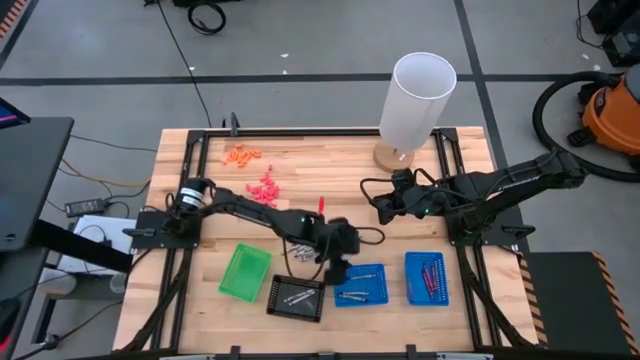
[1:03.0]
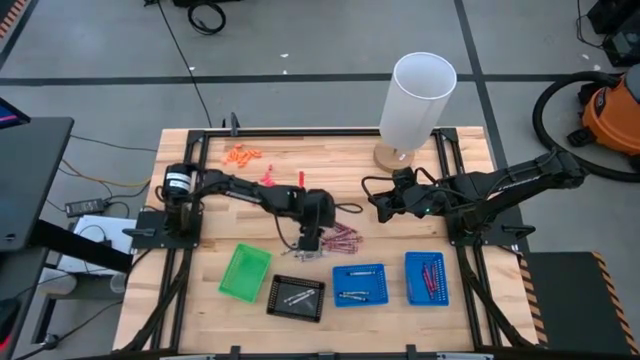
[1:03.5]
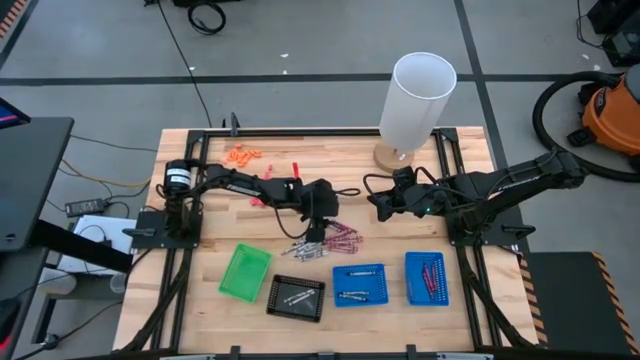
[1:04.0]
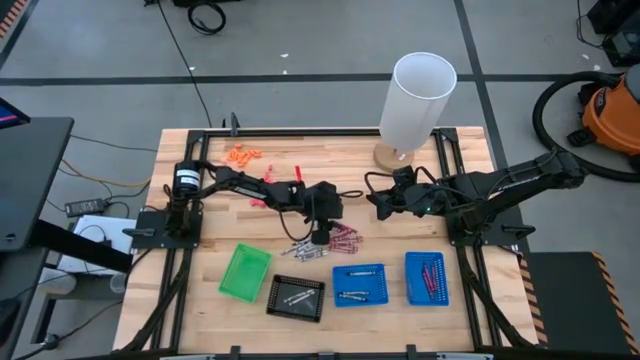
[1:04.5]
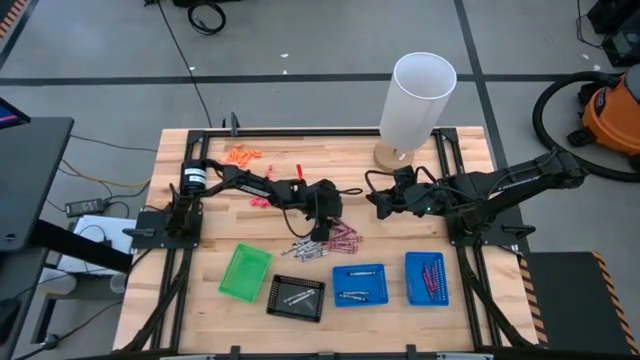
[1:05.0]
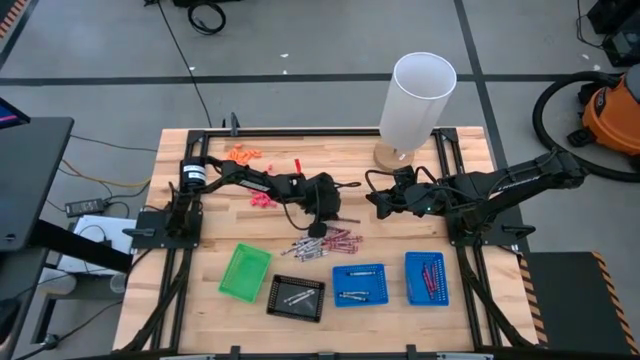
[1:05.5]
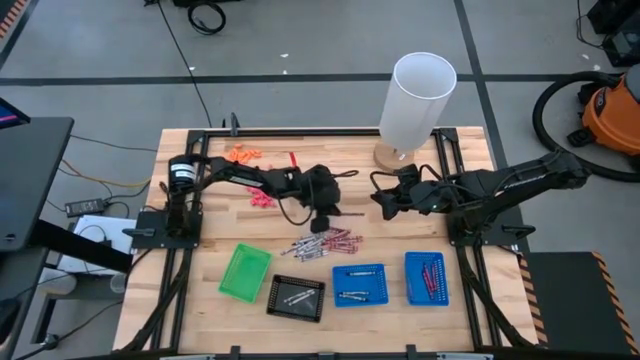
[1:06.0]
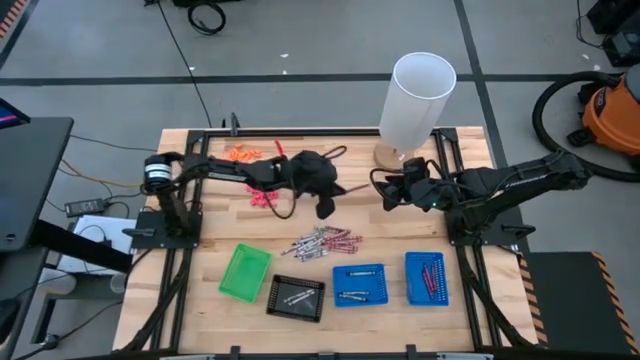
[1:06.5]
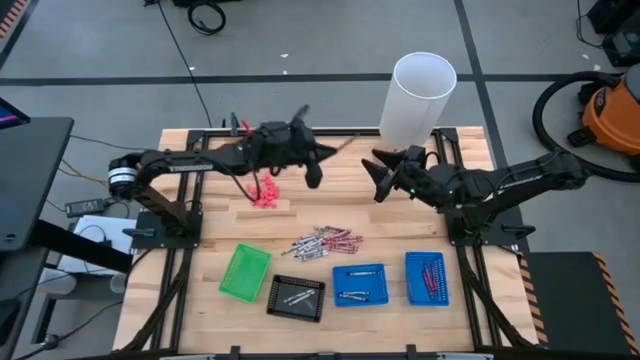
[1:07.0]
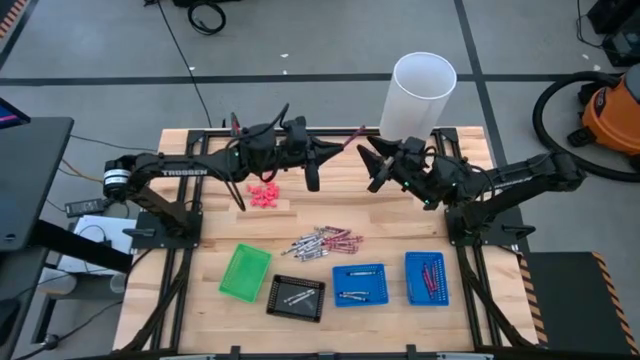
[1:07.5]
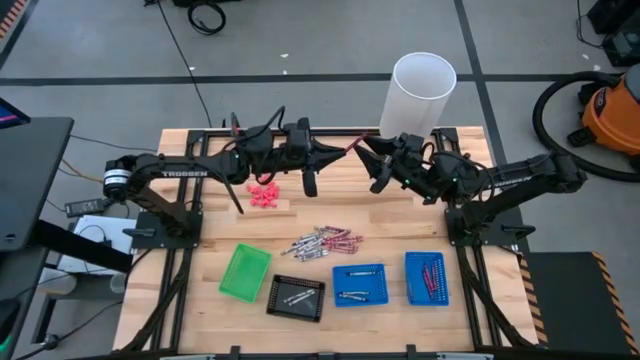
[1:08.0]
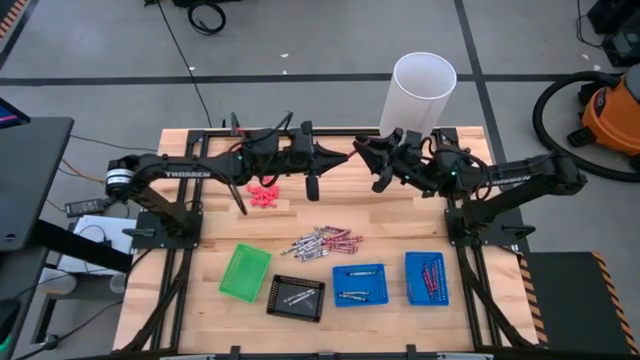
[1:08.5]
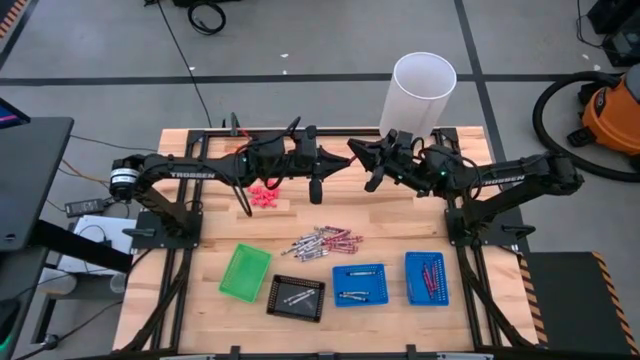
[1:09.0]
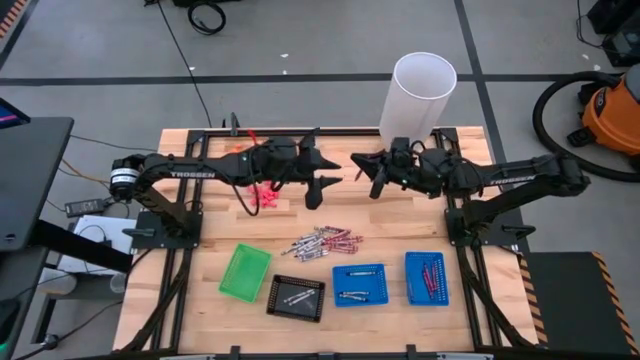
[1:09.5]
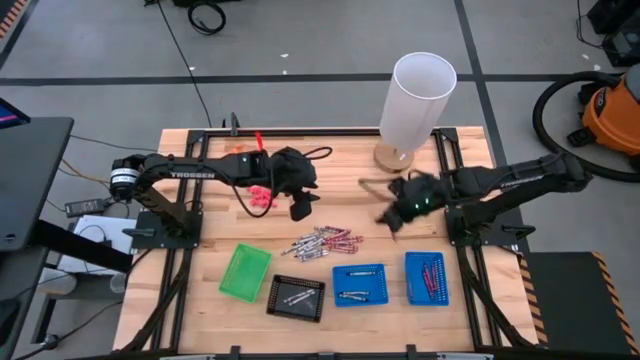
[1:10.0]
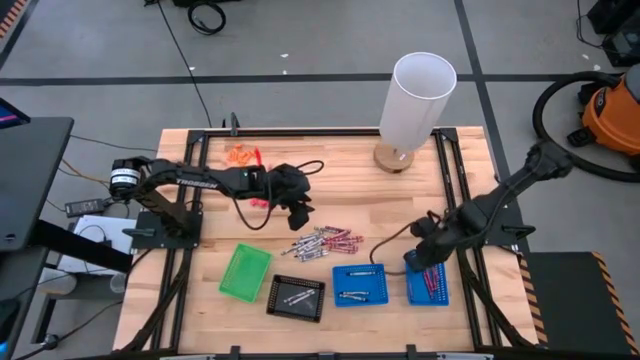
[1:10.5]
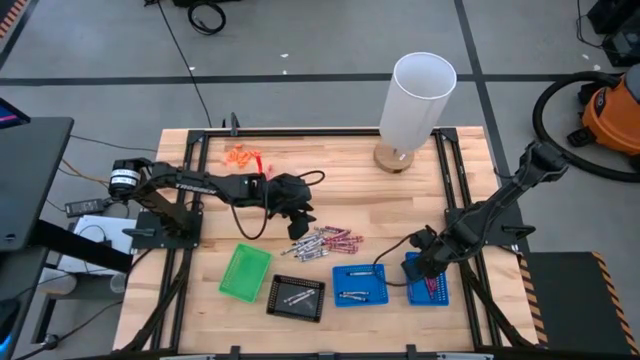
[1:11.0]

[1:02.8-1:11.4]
Task: Sort crayons
Put the red crayon into the right blue basket

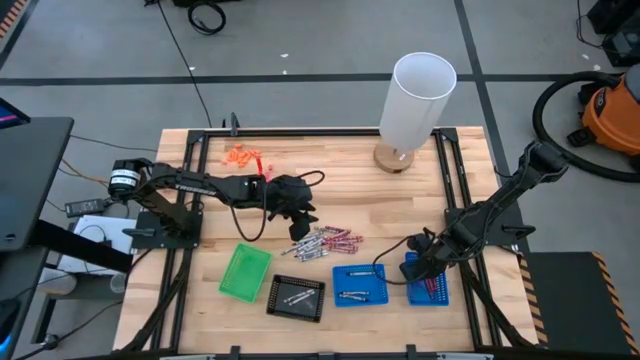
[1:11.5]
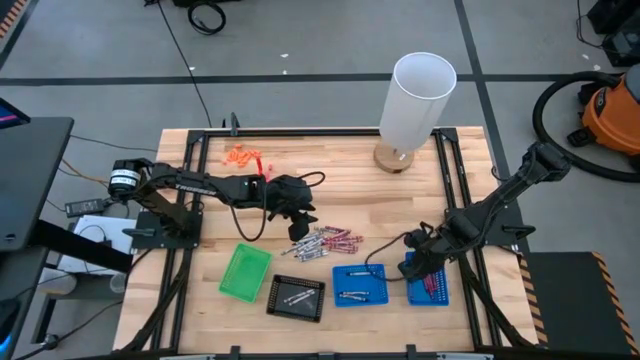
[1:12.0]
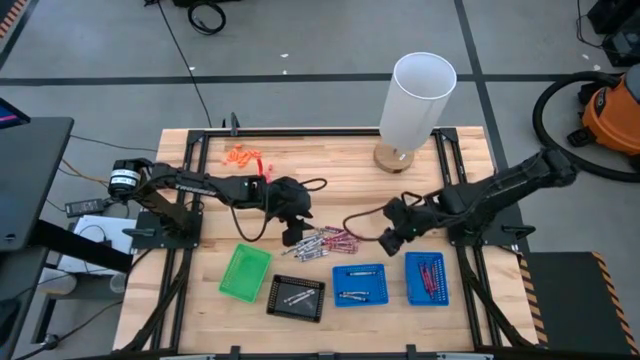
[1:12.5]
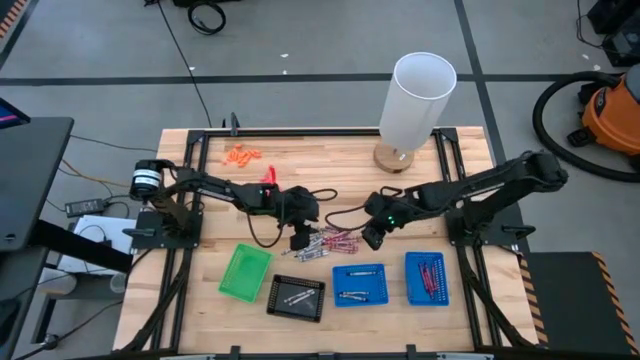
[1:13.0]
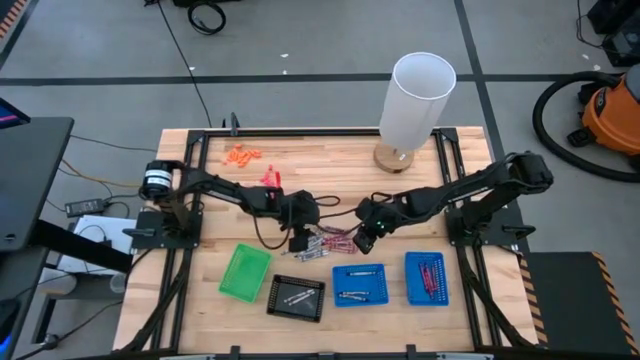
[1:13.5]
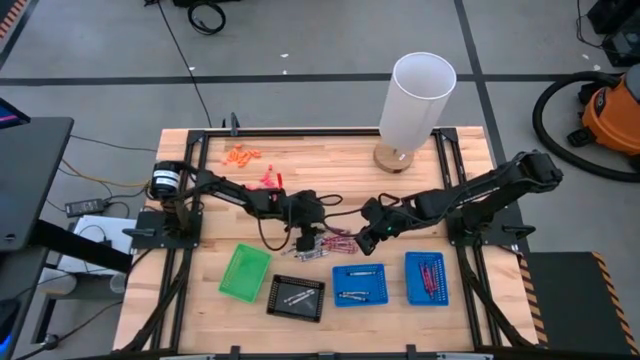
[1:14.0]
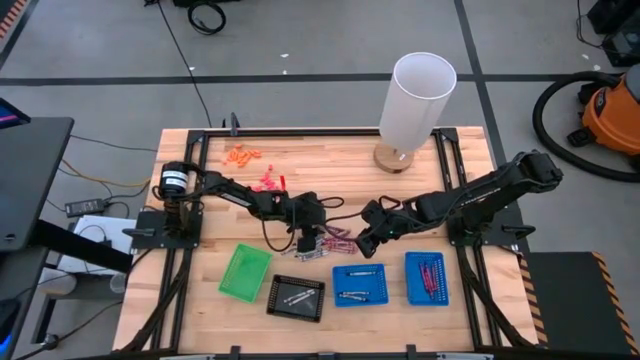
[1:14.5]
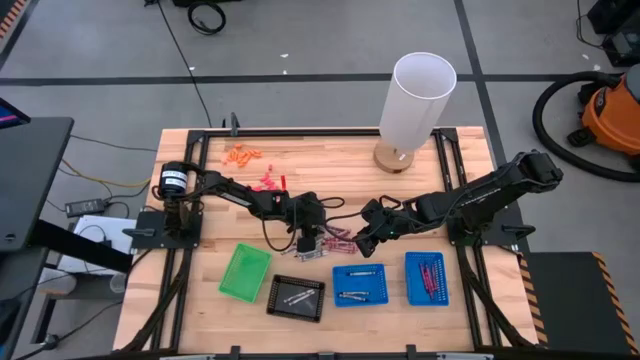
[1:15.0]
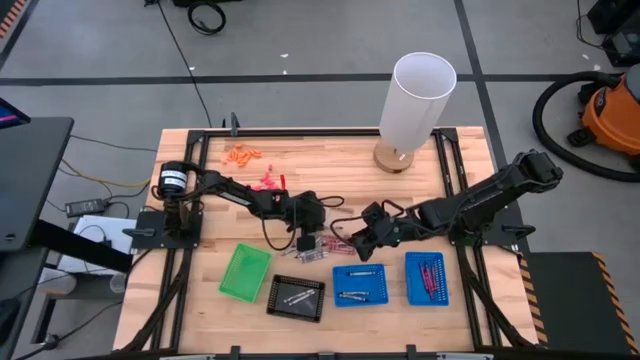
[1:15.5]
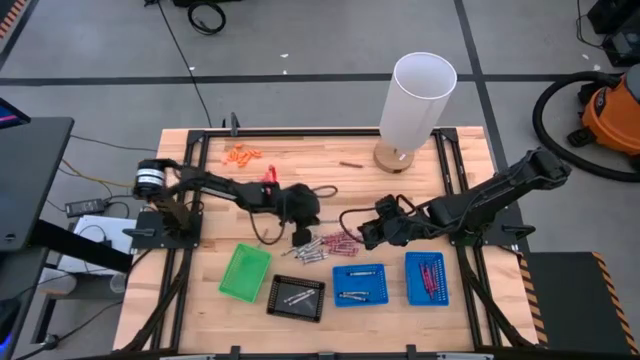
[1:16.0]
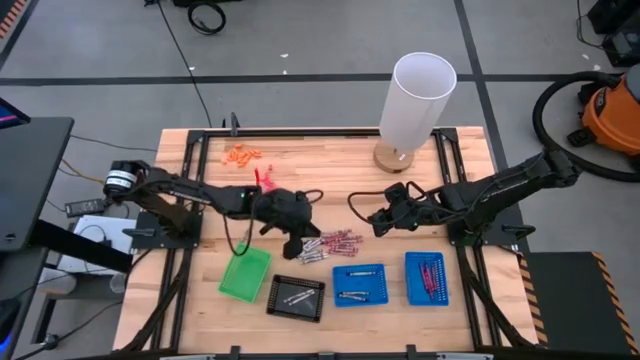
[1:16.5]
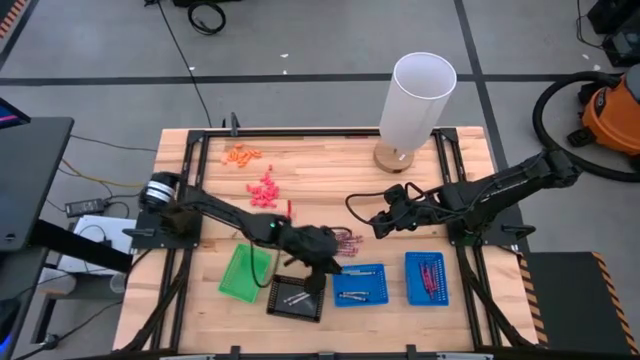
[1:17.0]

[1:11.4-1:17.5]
Put the black crayon into the left blue basket

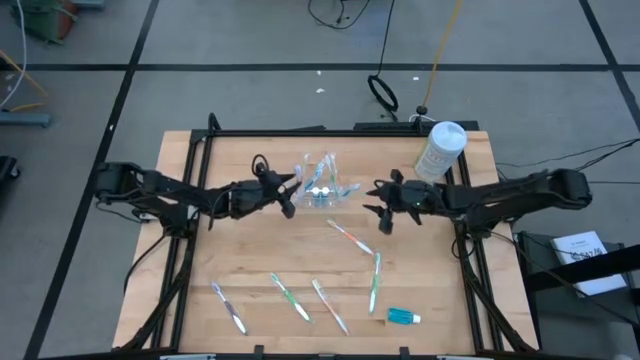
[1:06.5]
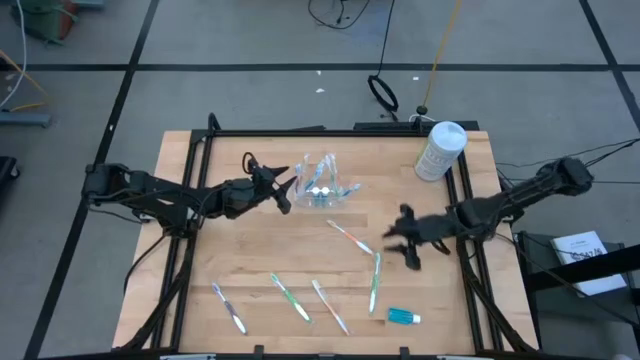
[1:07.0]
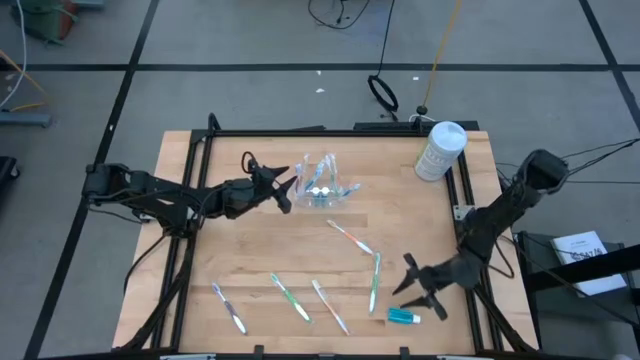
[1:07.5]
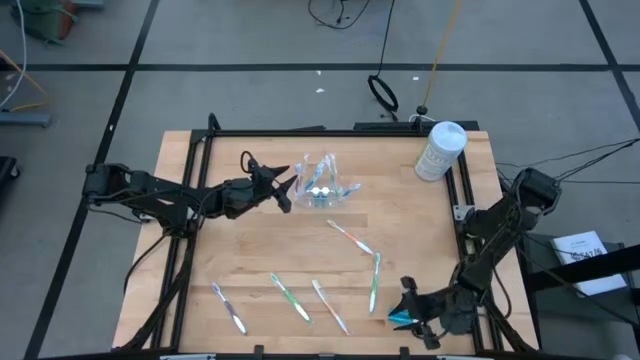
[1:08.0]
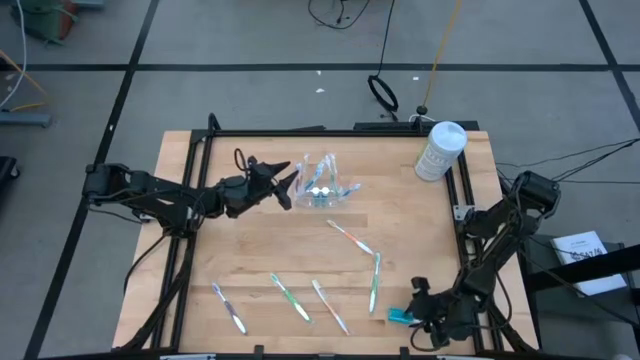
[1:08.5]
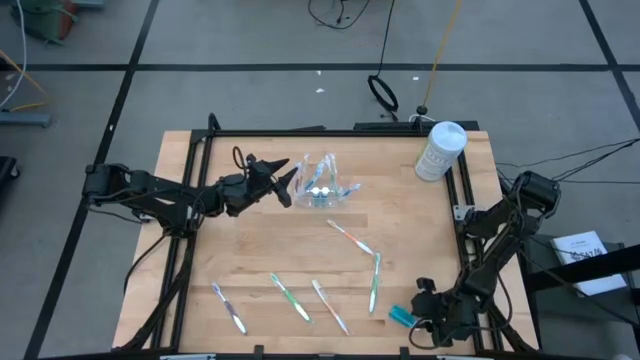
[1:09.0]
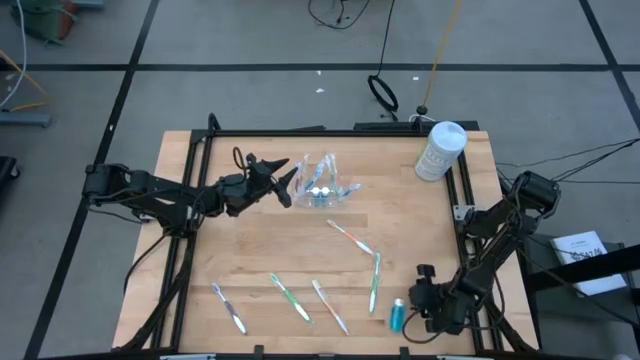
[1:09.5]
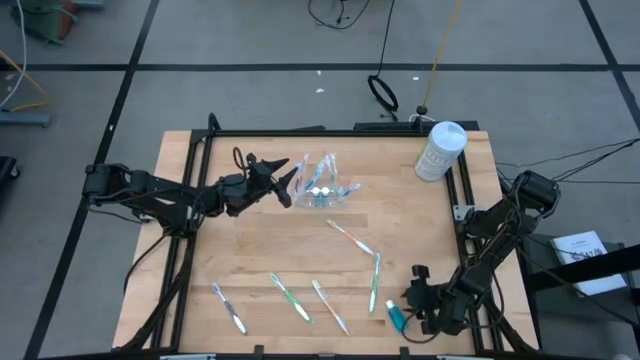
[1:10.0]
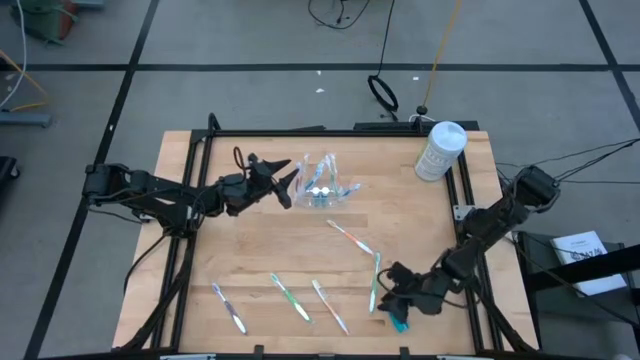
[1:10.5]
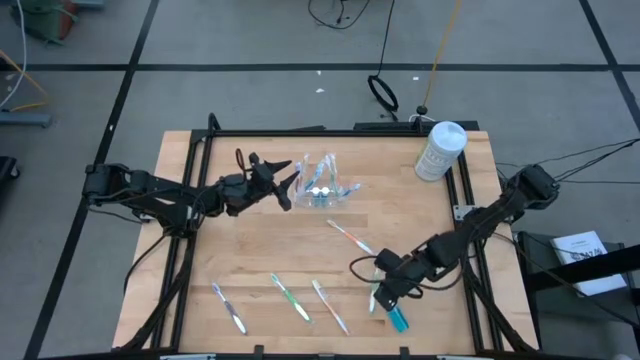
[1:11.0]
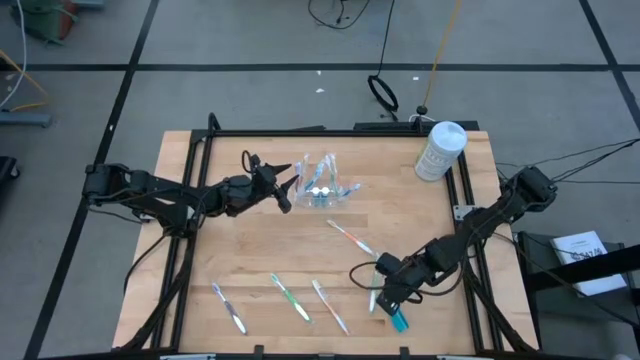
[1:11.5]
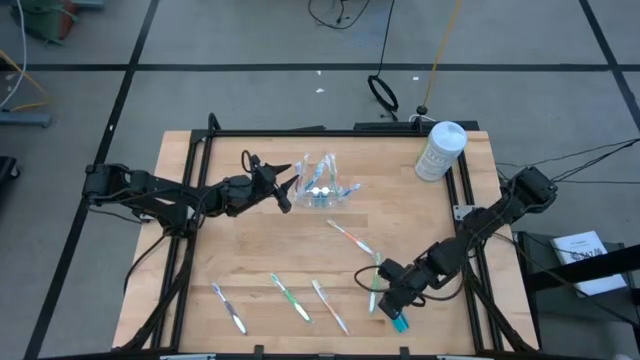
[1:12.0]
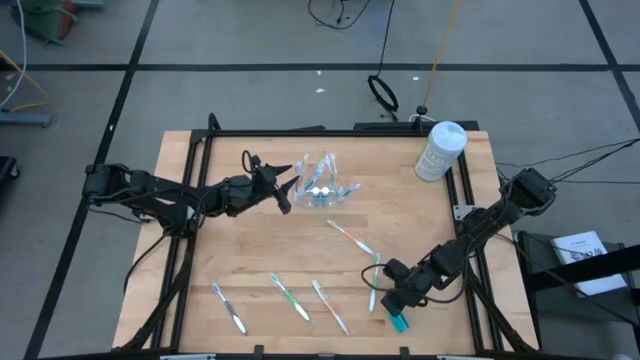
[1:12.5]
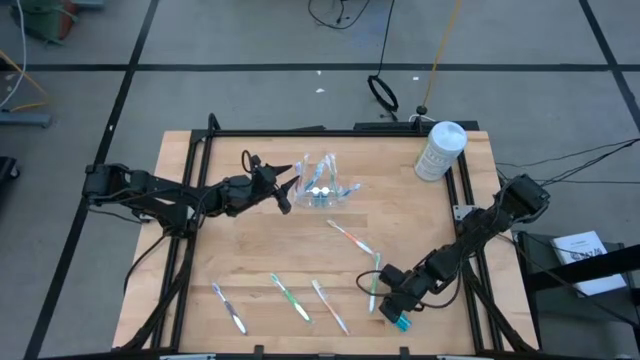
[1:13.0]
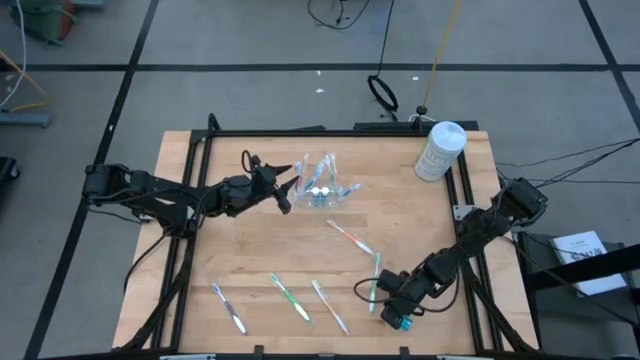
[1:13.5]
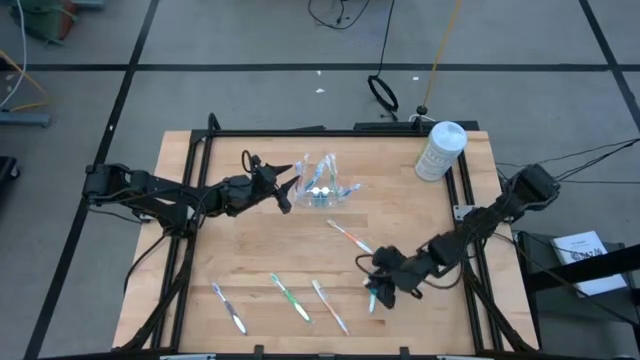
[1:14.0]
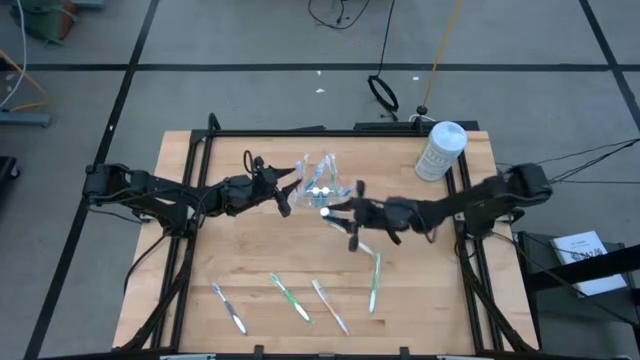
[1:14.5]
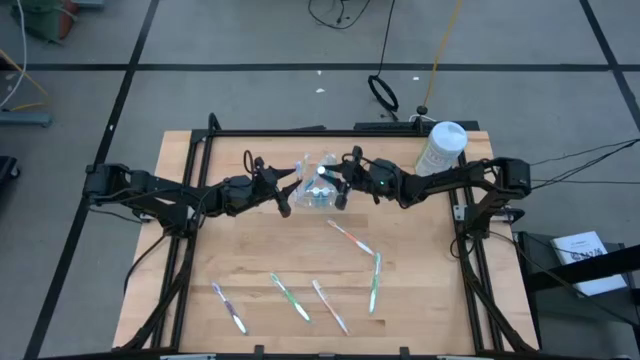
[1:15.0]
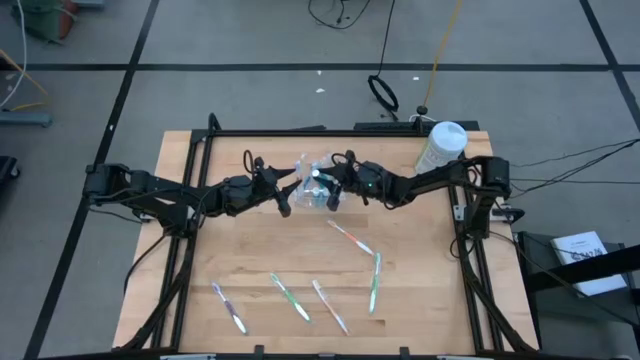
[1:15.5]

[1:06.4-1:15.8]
Task: Pick & Place Toothbrushes
Put the mouthwash into the transparent organizer
